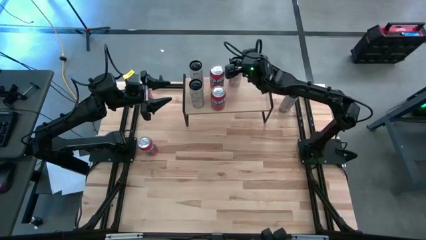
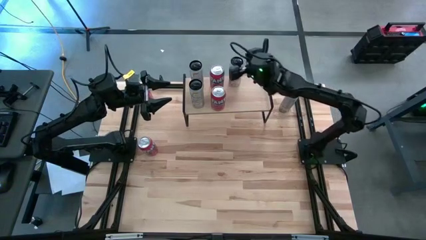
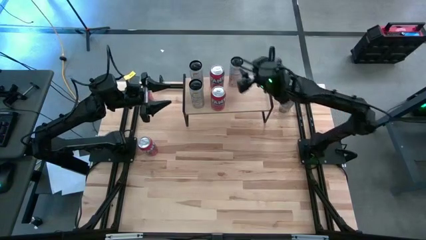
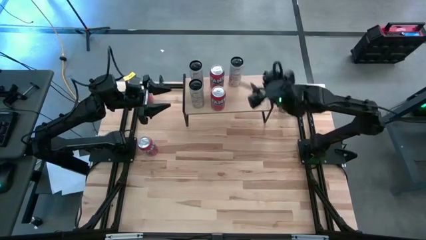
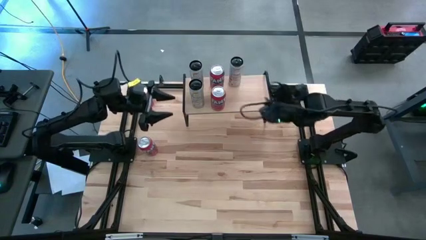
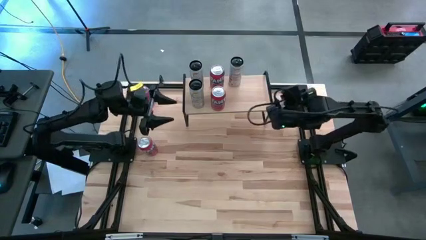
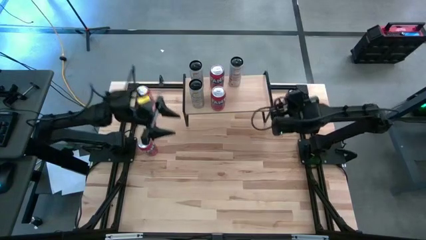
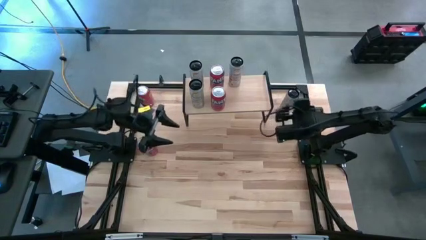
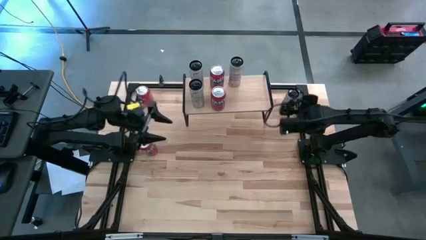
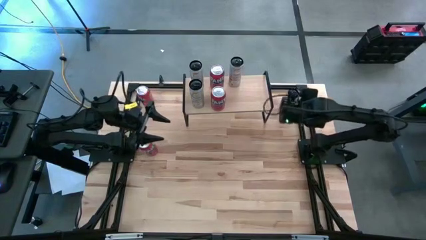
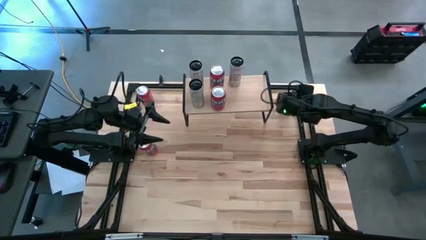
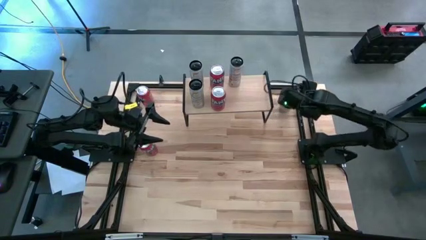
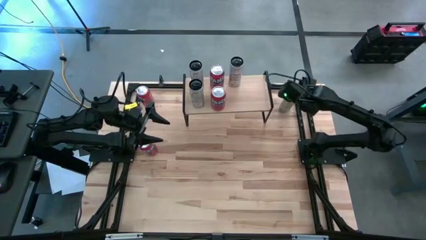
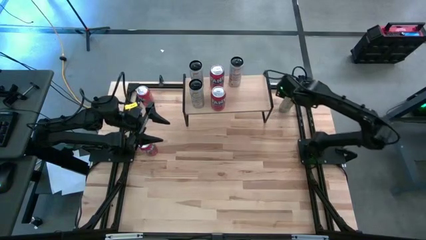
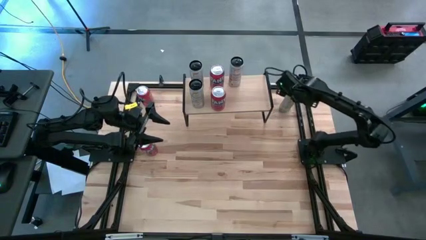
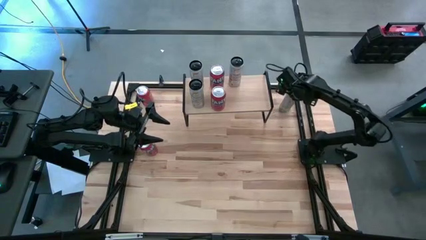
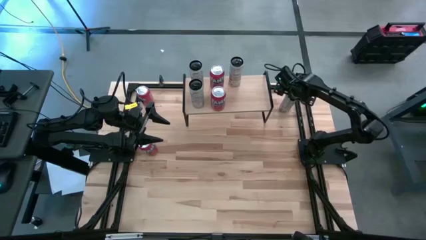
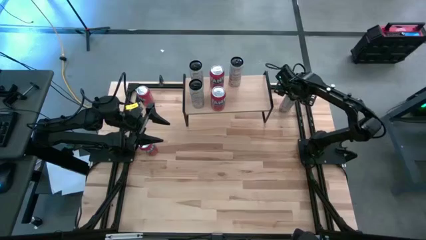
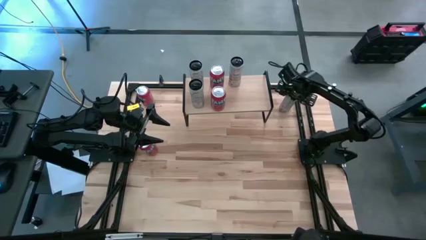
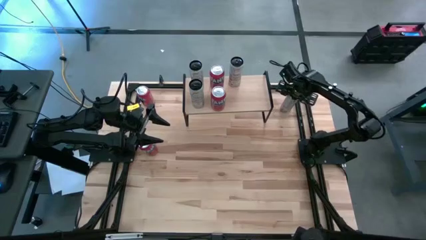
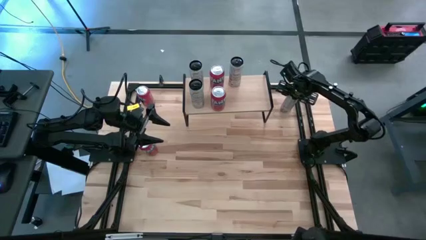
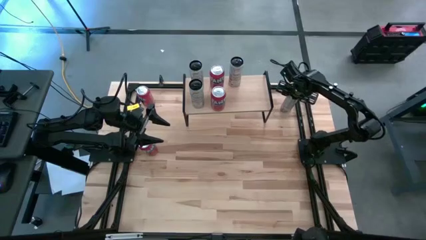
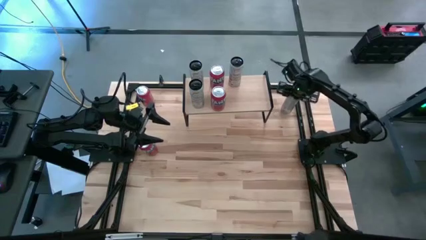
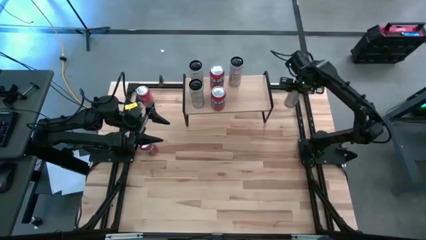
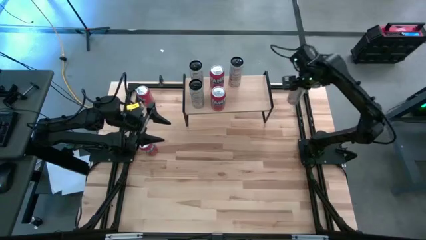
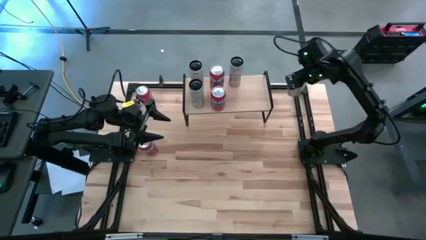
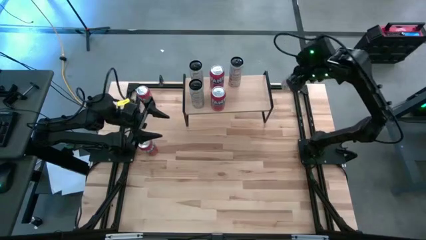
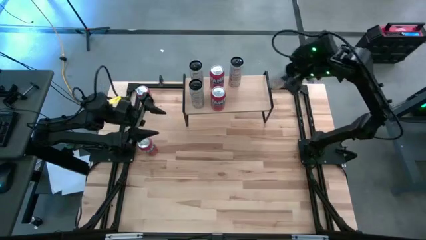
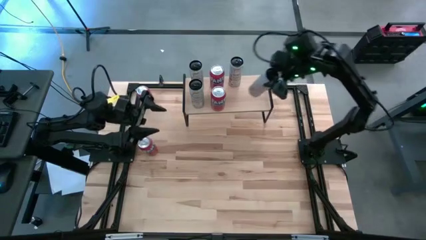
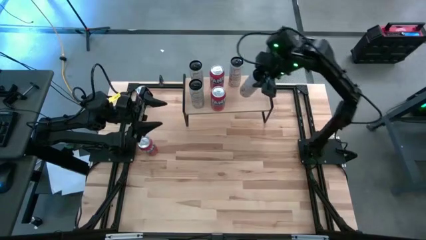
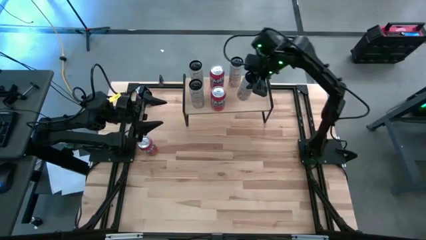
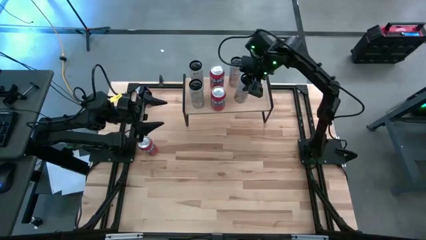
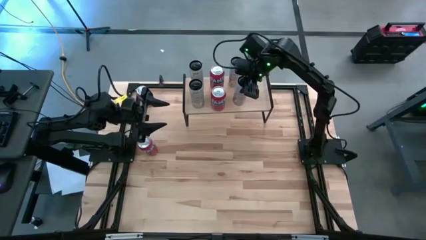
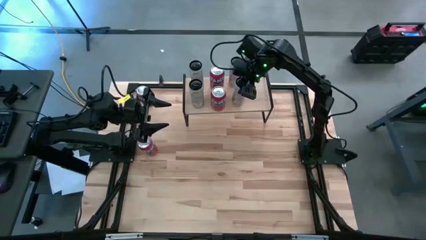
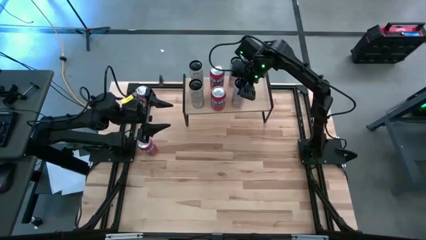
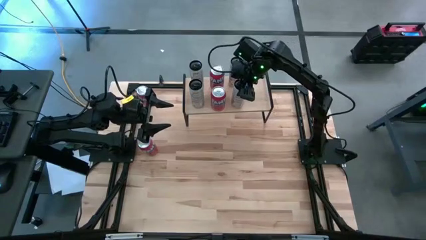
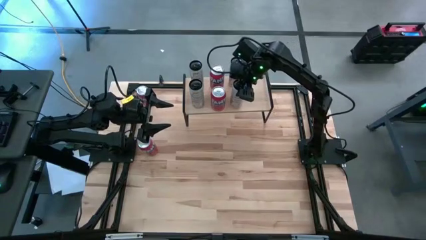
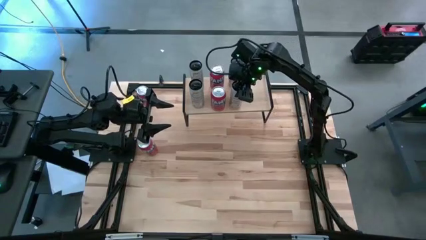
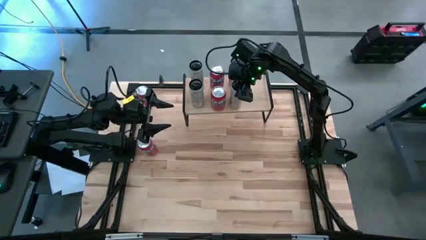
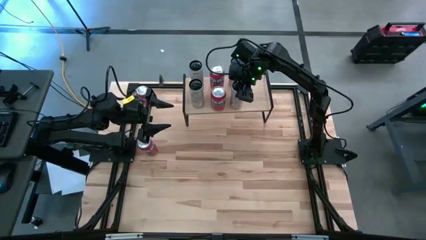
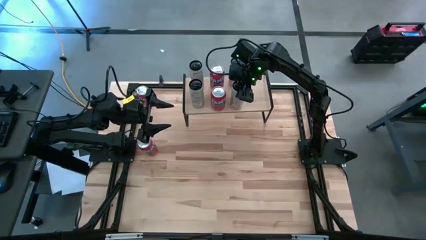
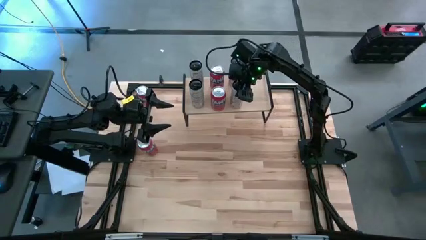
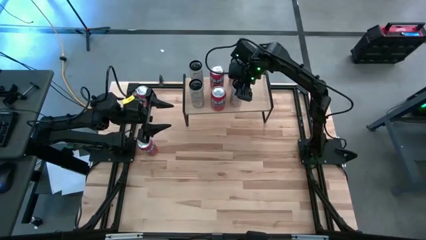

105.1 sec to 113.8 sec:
Task: Place canned beverage on shelf
Put the white yellow soda can on the shelf aligned with the other white yellow soda can

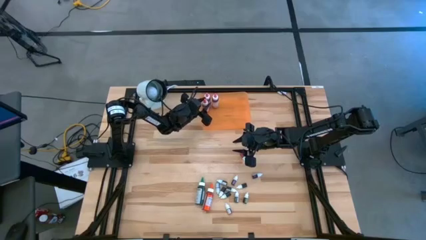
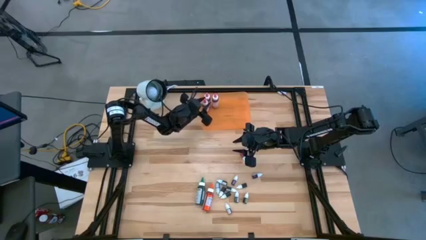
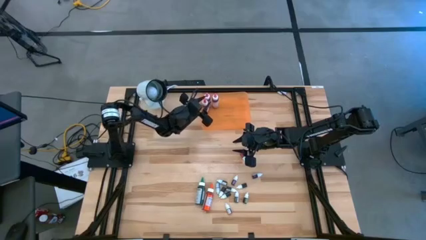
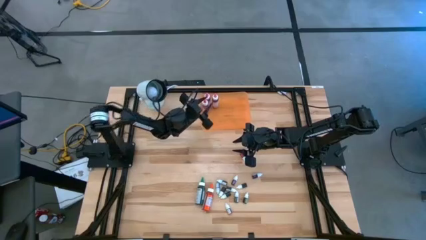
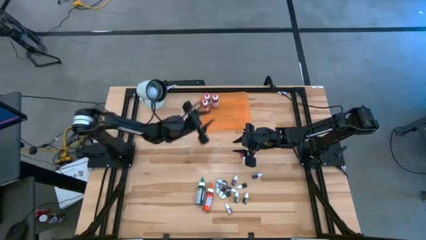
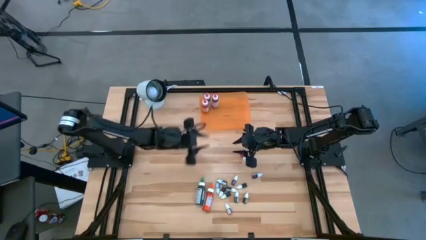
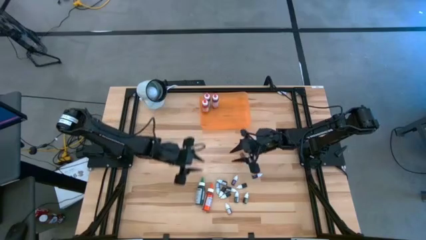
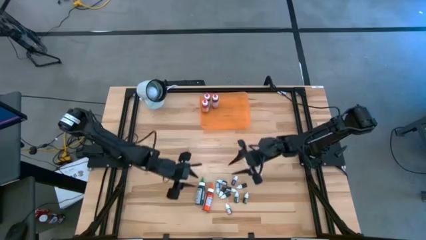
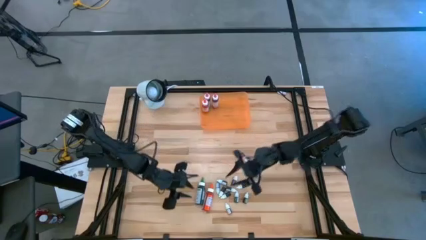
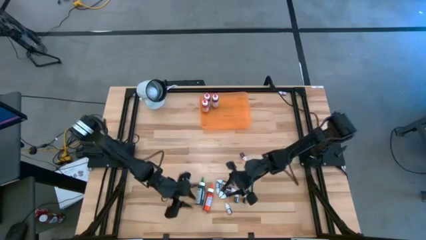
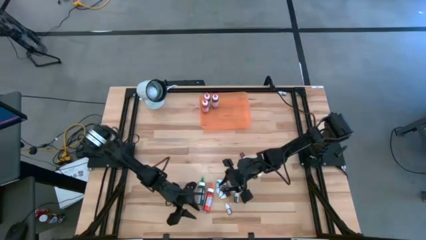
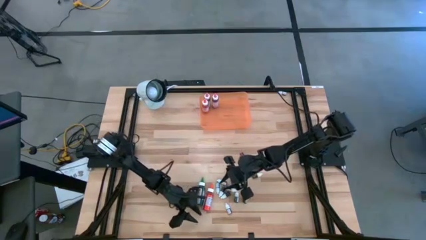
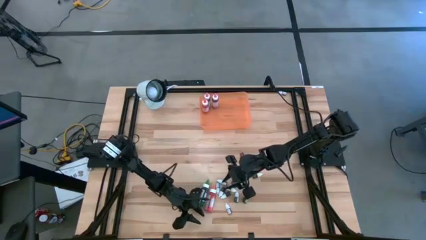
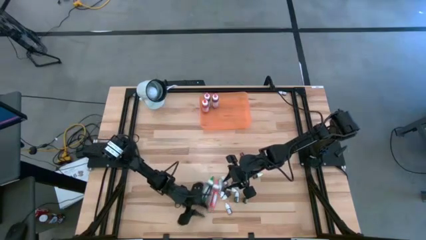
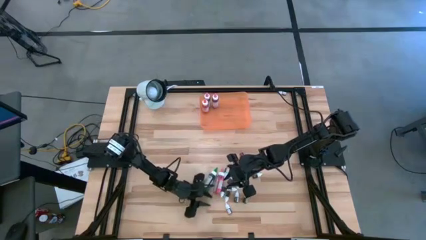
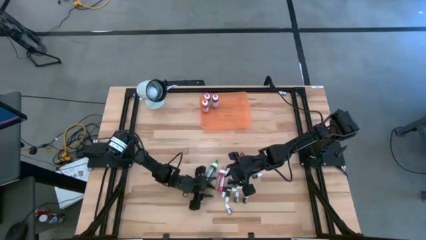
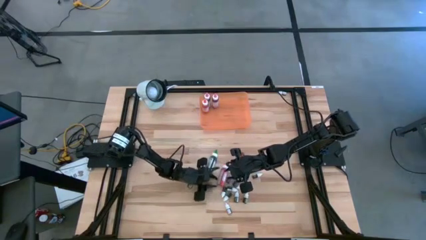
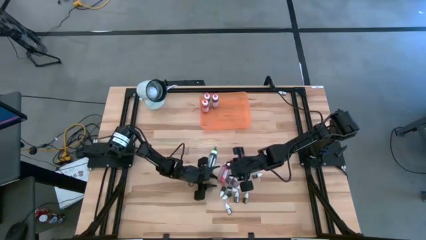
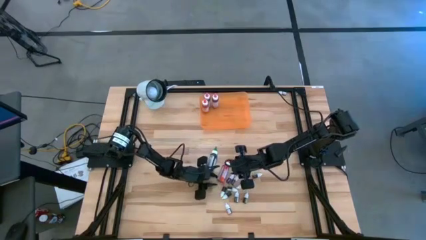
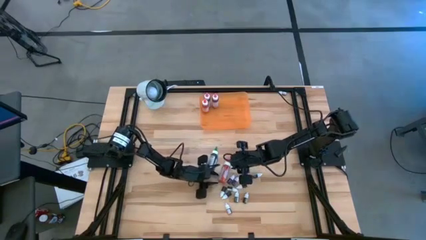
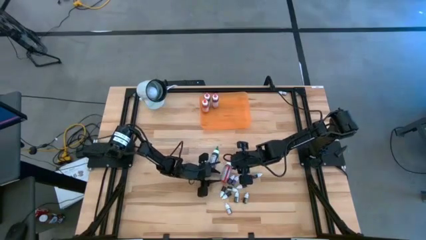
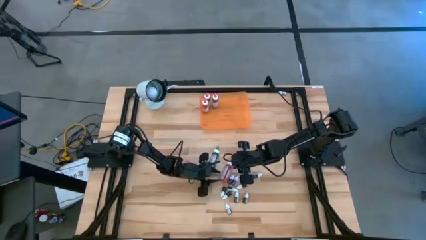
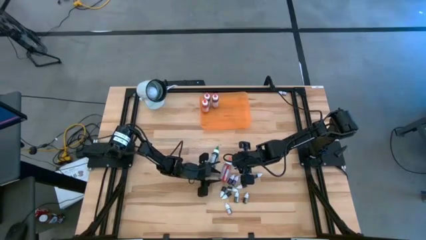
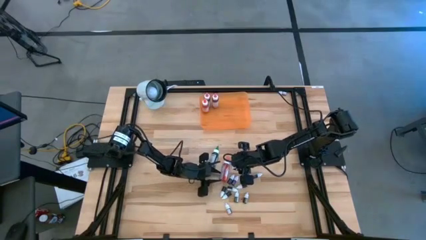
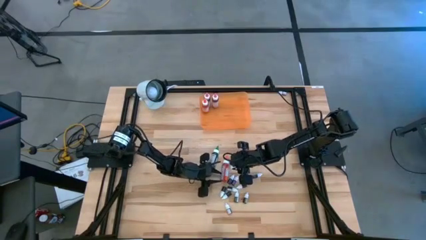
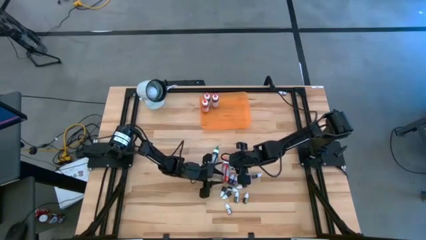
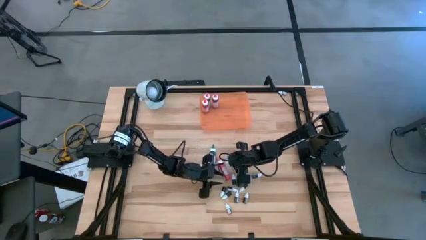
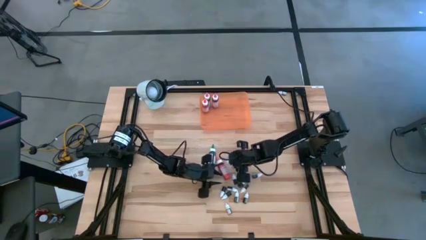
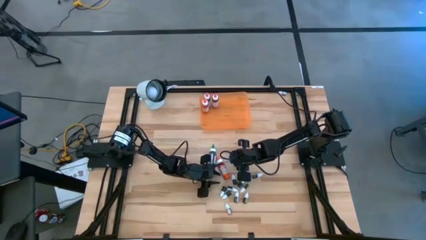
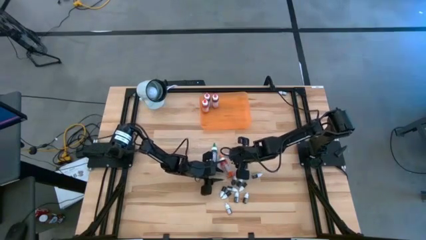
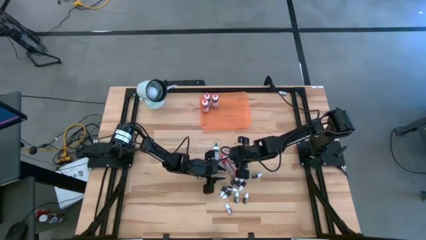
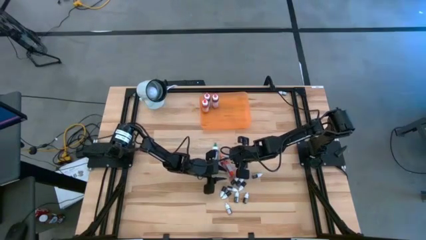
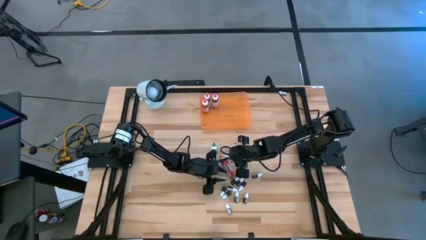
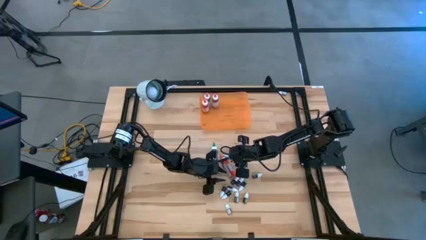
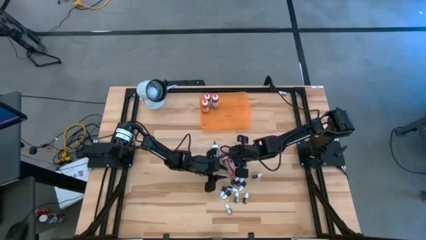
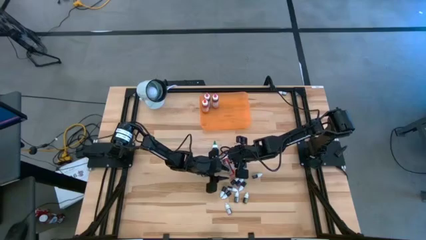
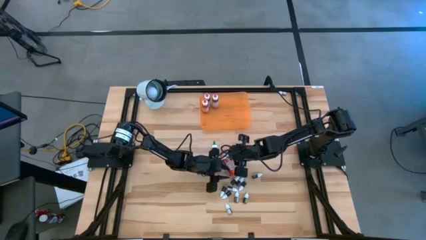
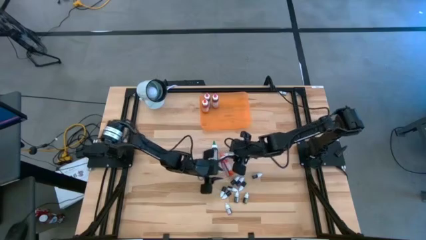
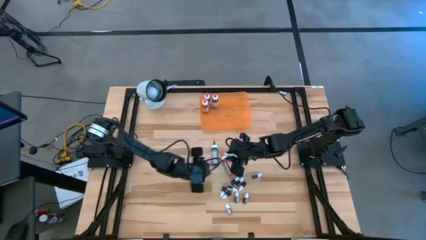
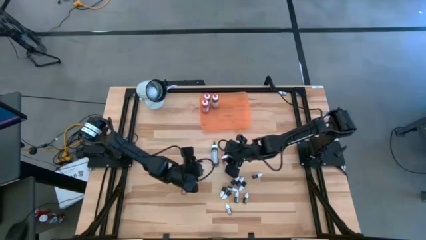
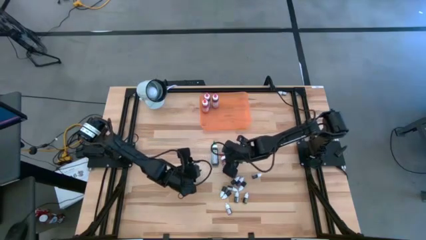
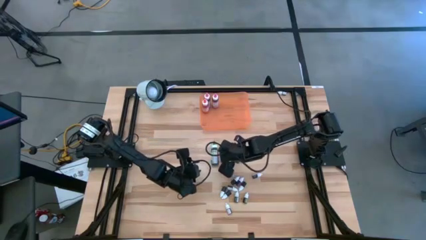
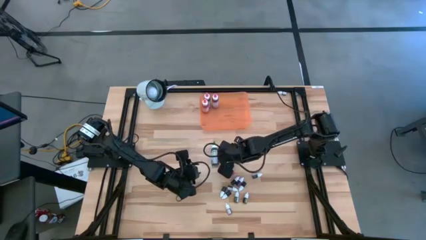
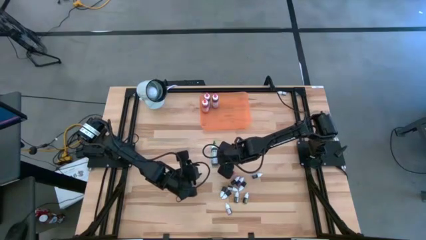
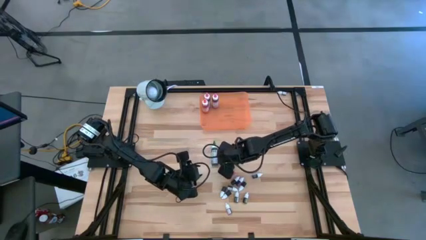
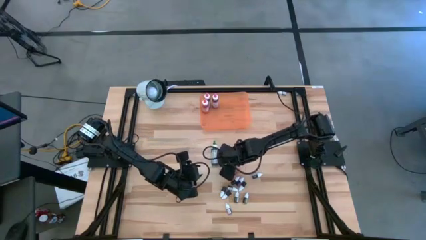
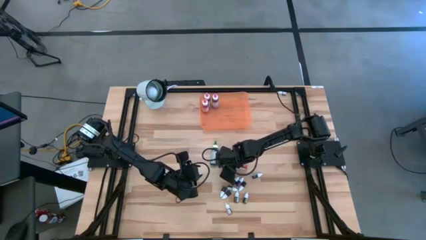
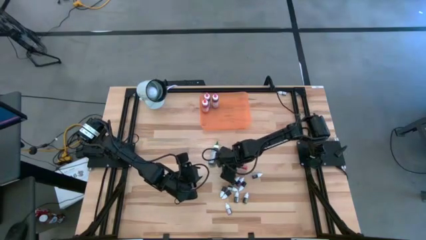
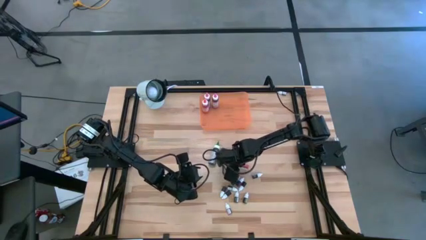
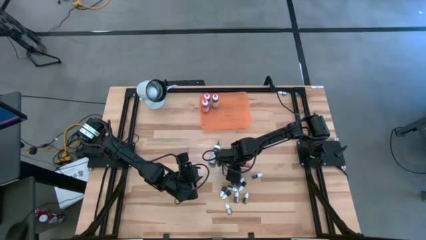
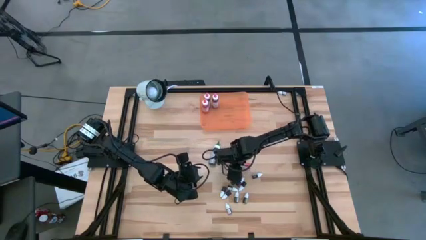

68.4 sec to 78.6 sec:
Task: Pick & Place food coloring
Put the large orange coloring bottle into the orange bin
